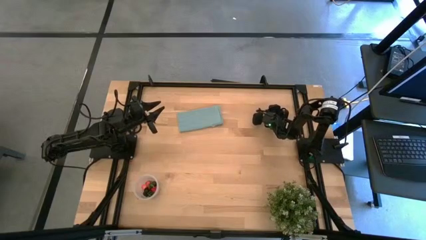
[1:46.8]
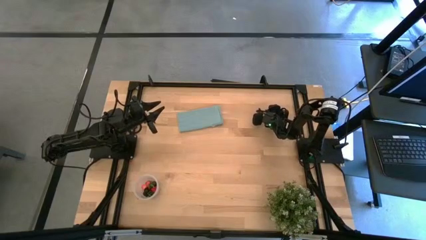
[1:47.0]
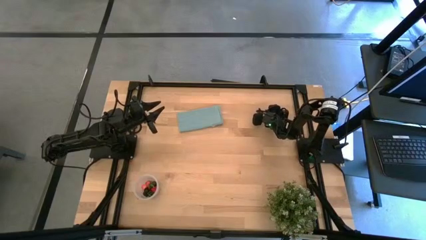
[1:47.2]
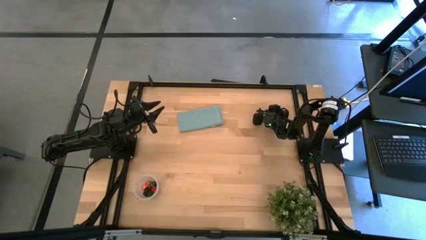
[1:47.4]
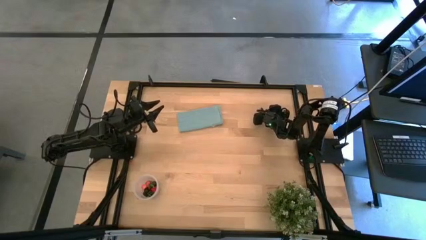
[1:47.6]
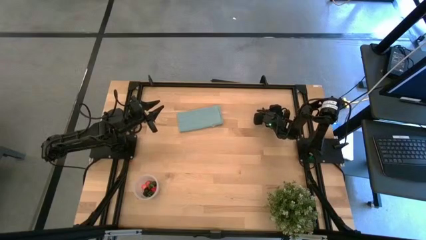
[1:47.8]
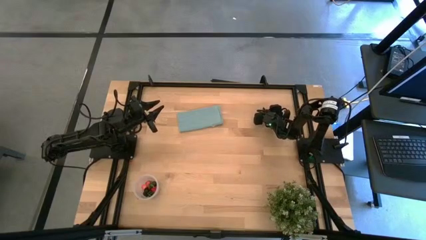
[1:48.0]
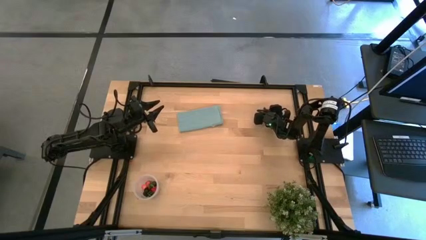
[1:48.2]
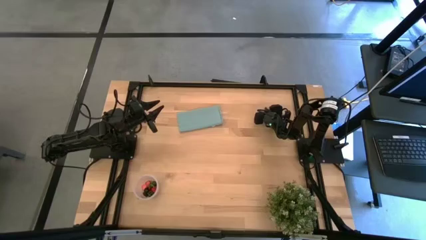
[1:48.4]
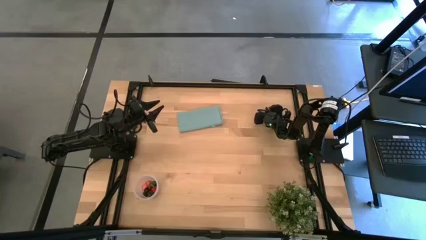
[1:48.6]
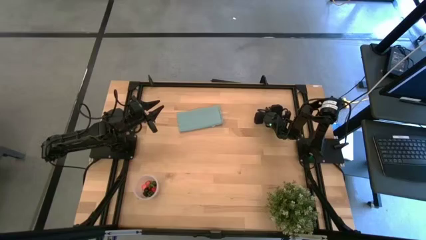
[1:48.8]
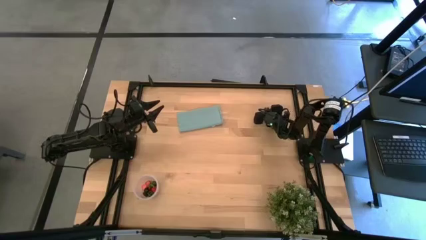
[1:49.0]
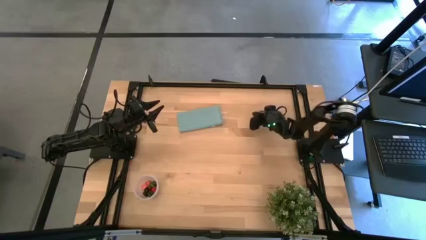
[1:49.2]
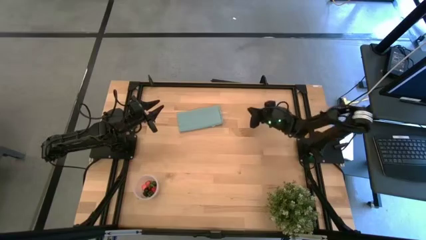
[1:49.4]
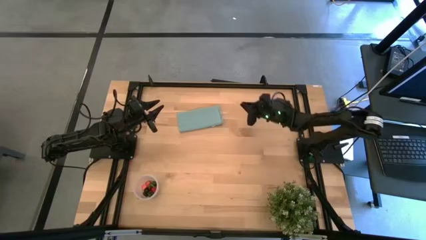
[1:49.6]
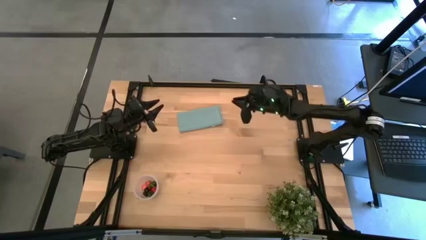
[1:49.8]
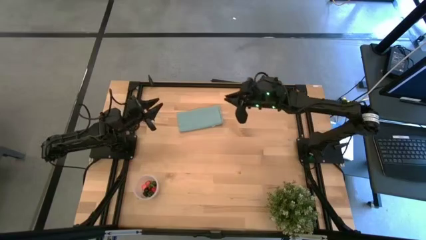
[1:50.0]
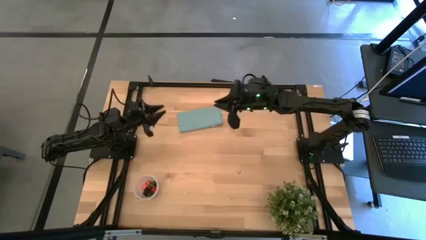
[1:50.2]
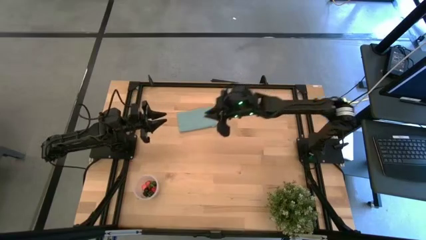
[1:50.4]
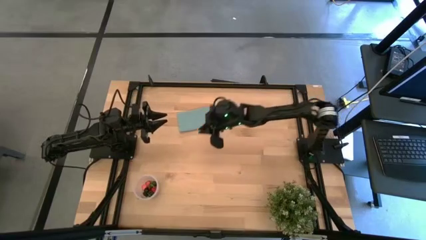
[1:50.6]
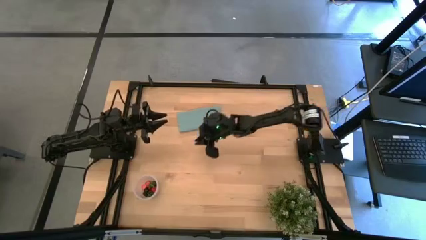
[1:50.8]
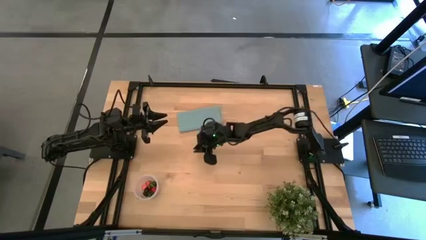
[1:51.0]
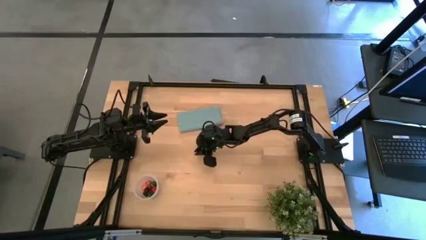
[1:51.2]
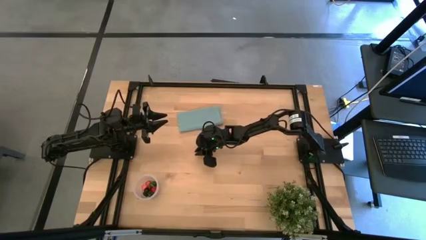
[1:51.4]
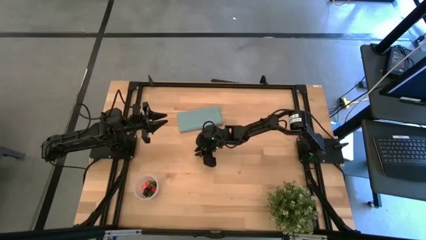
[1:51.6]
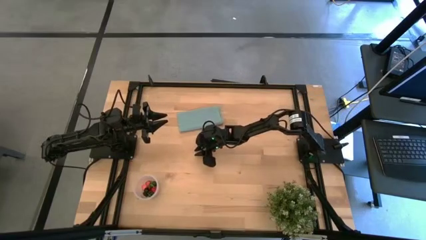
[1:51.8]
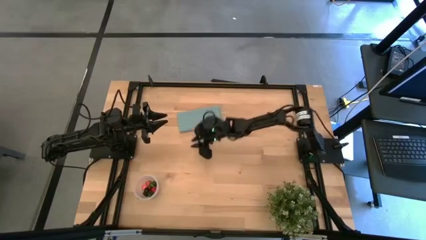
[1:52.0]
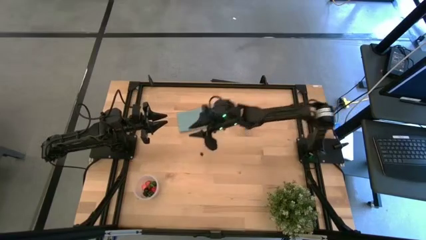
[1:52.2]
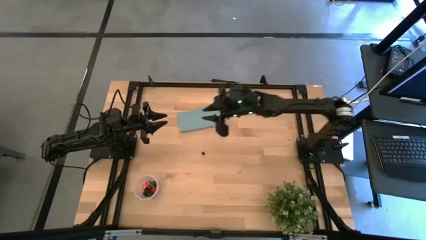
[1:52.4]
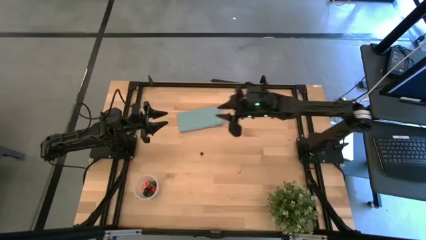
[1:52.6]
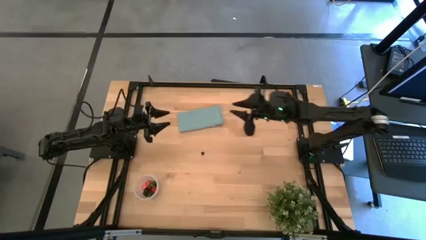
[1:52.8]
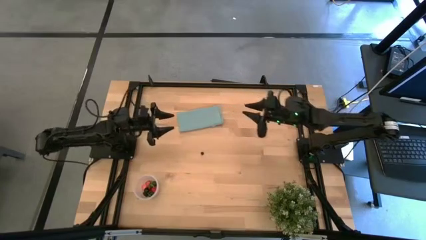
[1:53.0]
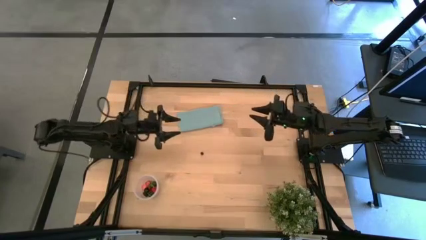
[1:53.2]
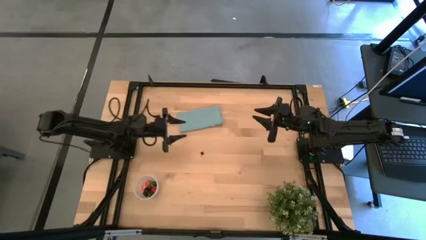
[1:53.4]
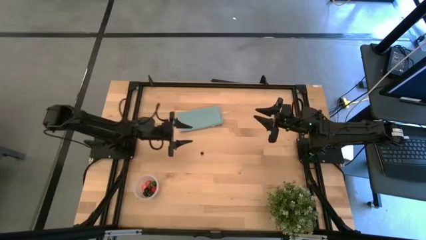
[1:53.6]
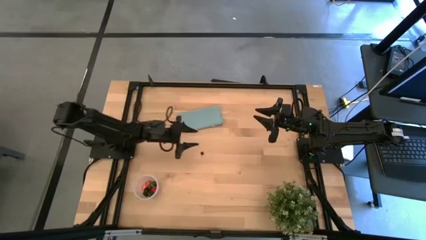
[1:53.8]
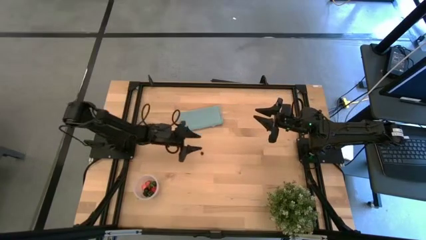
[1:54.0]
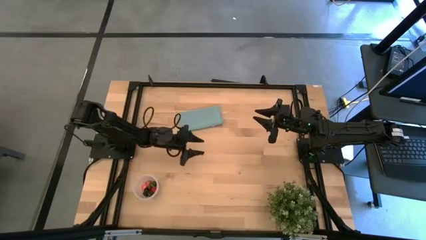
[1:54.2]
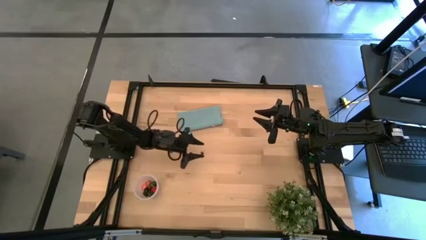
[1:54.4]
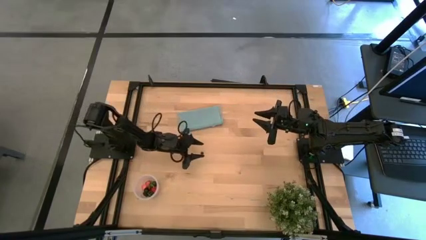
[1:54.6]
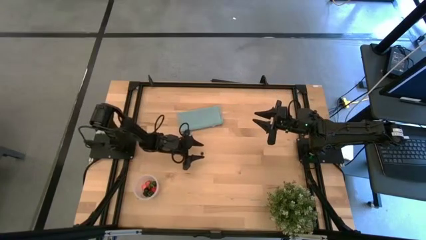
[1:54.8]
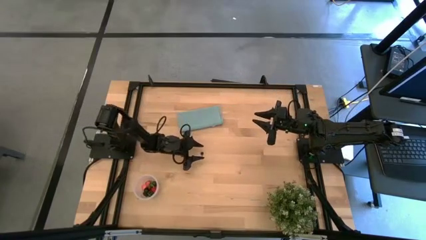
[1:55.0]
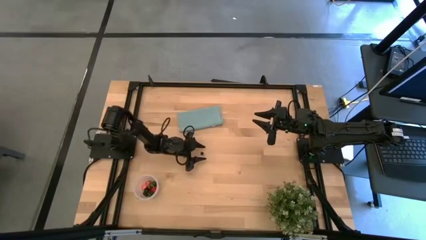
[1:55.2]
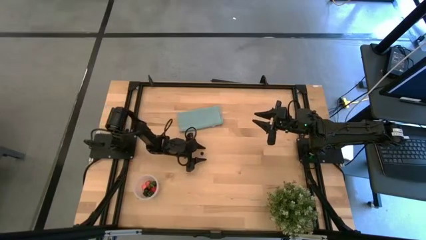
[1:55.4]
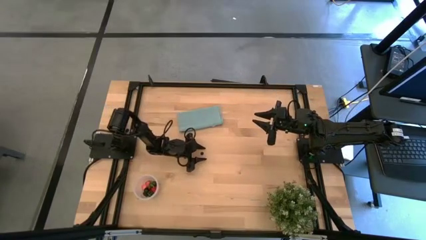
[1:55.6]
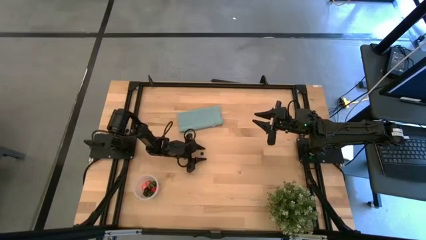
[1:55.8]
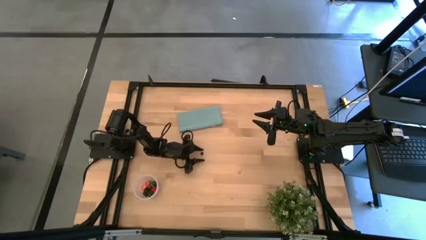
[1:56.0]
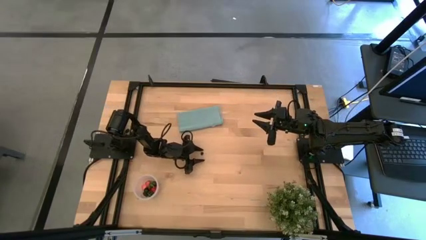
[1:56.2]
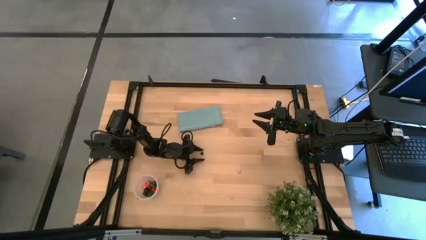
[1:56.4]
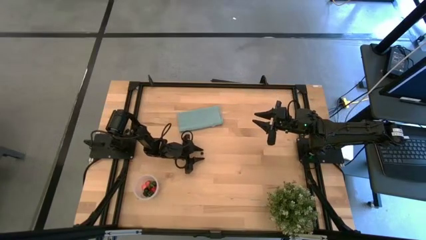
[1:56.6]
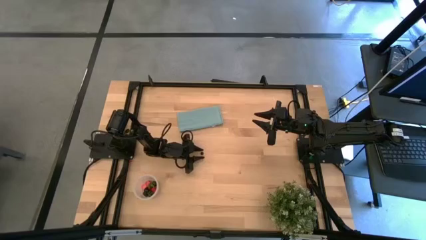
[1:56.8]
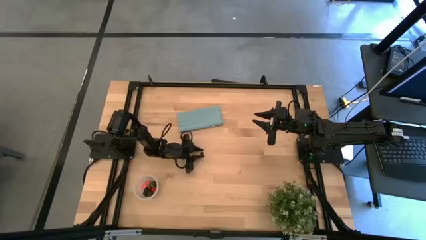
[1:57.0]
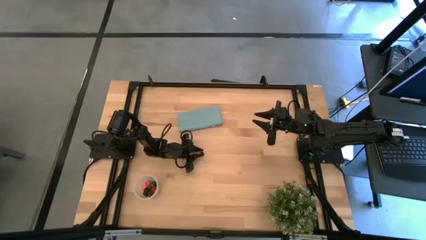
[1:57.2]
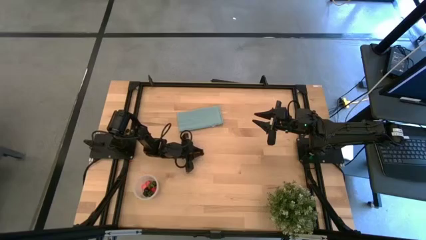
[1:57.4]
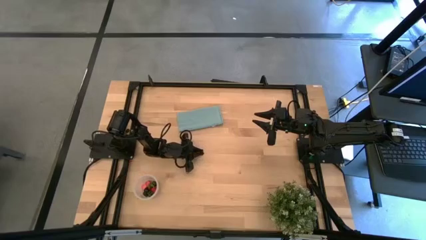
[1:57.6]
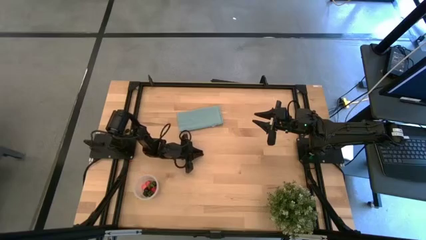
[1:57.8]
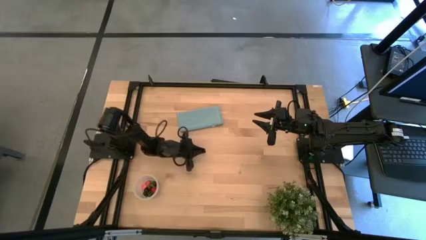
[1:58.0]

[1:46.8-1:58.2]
Task: Pick and placing Produce into tupperware
Put the blueberry into the transparent container

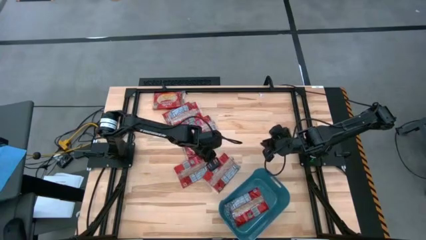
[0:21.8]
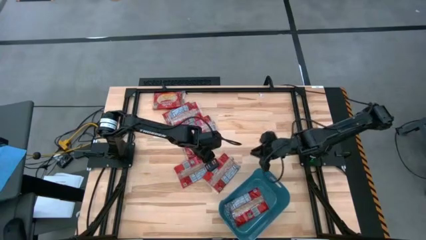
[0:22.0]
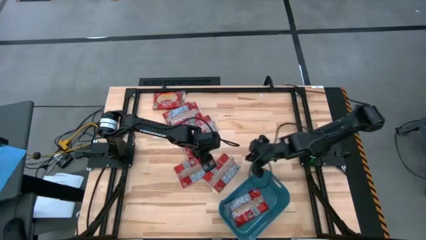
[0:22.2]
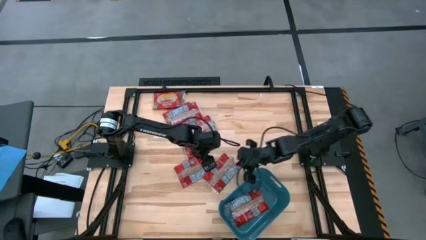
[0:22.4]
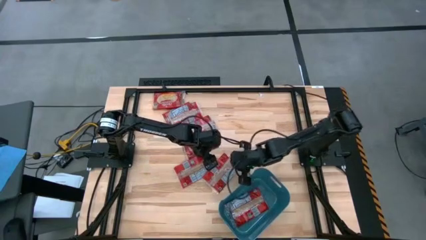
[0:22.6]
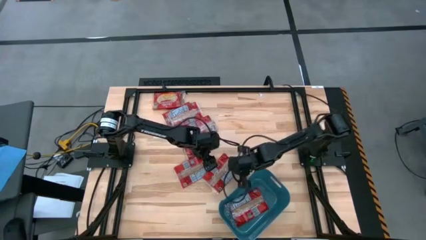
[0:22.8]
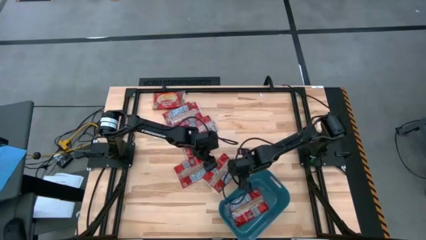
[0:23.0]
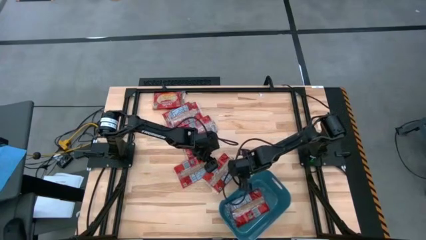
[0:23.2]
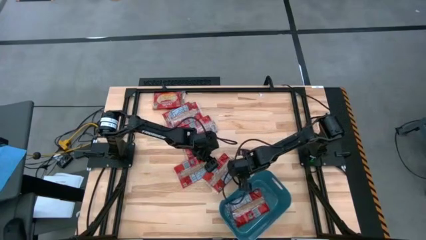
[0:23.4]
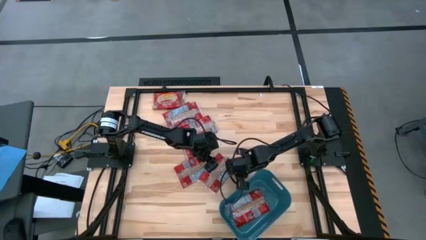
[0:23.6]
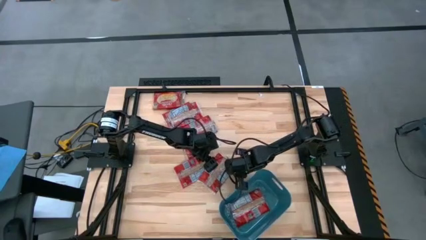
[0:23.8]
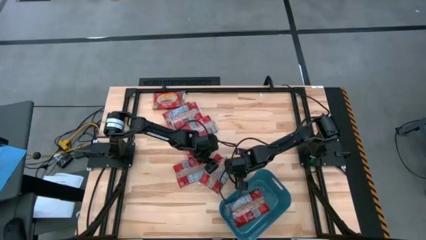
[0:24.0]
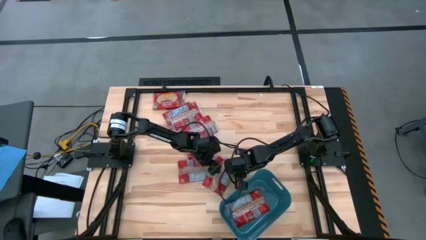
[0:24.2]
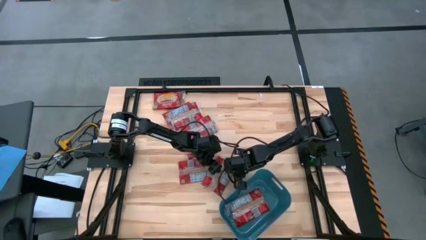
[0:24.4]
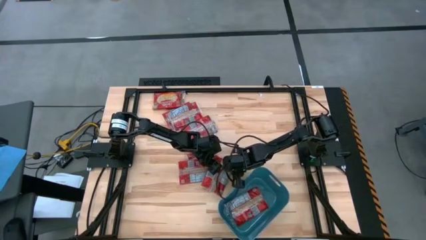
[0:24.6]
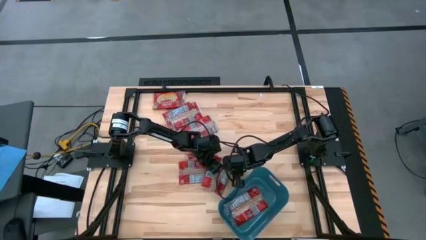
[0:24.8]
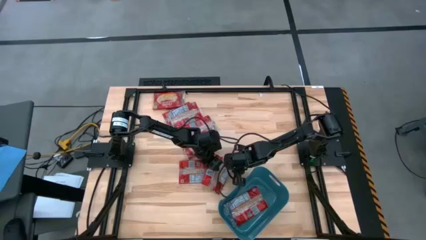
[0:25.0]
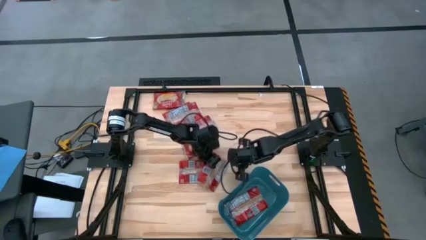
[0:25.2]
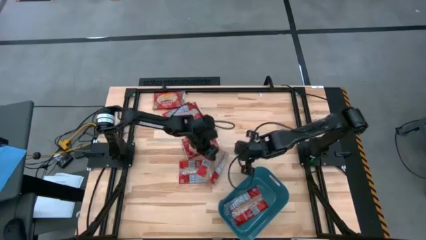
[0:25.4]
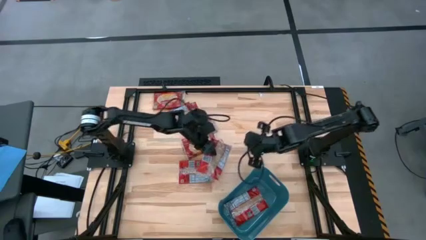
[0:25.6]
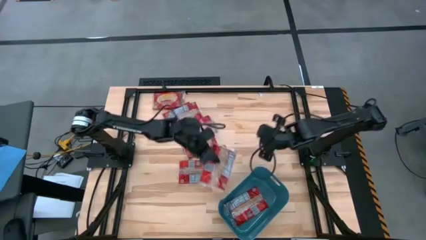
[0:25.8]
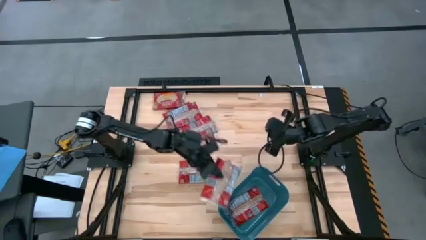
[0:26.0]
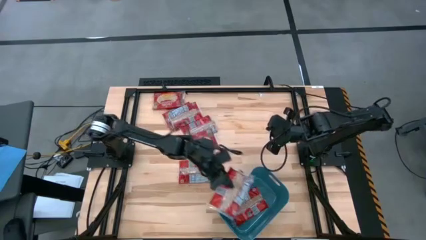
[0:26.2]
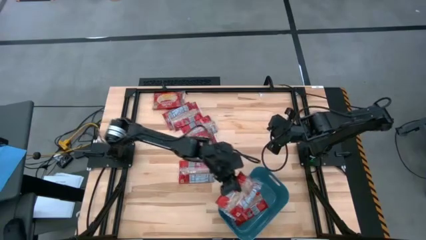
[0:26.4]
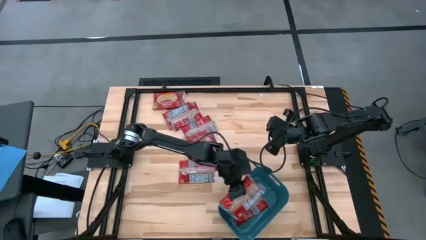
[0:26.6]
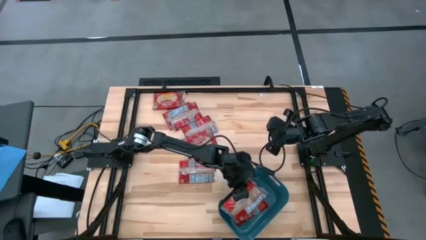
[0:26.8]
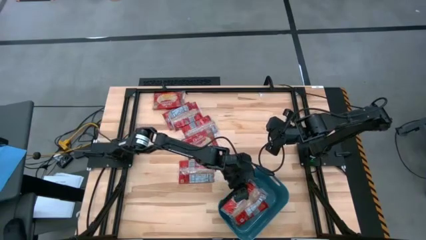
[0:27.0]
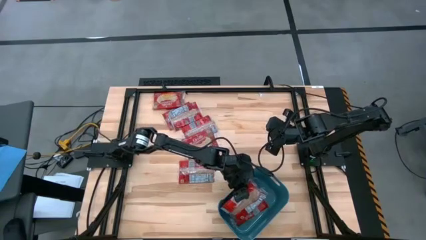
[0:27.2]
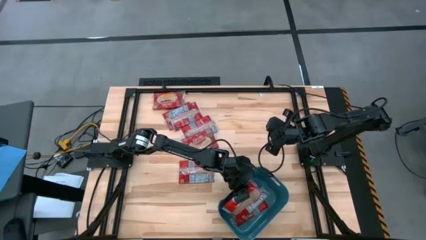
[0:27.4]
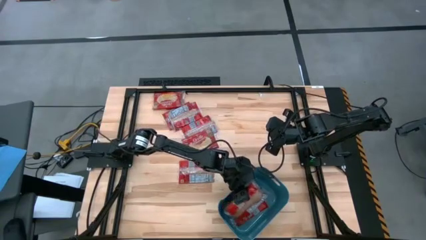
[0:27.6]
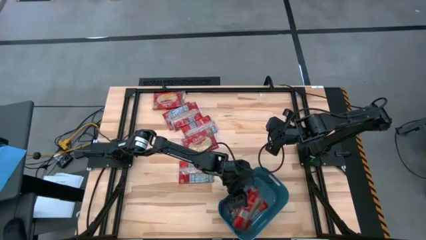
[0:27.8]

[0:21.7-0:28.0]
Task: Sort popcorn bags into baskets
Put the popcorn bag into the blue container
